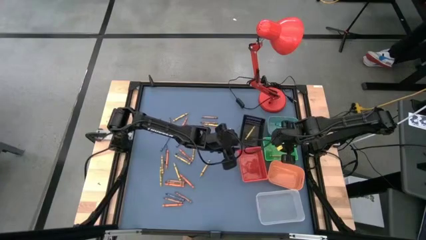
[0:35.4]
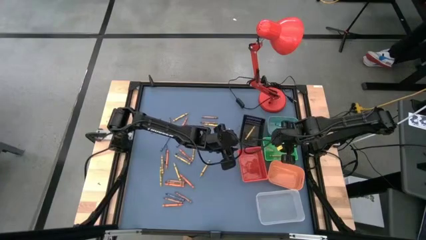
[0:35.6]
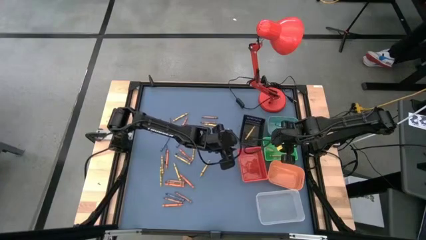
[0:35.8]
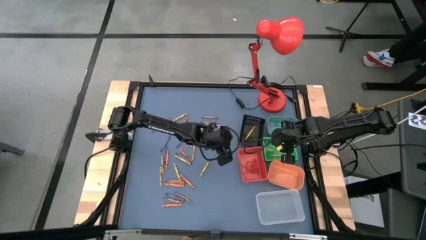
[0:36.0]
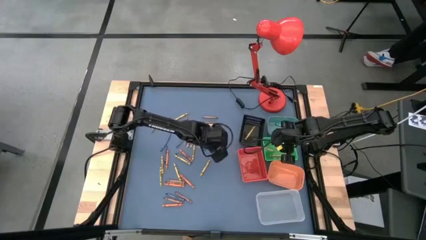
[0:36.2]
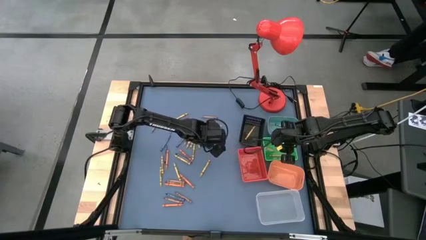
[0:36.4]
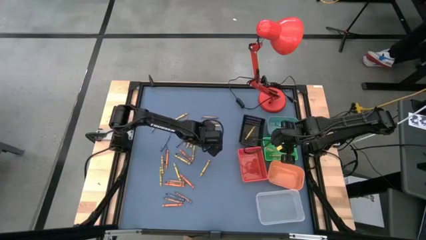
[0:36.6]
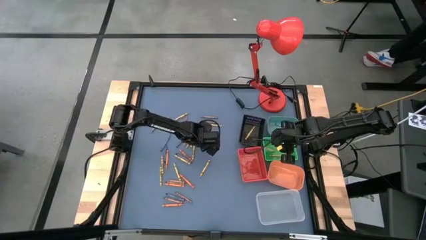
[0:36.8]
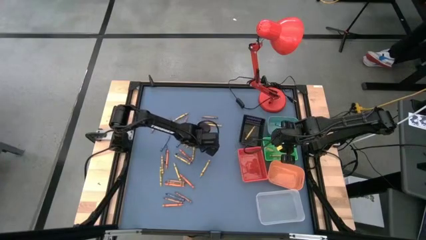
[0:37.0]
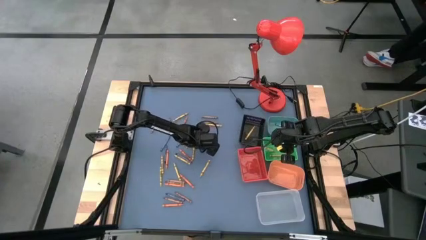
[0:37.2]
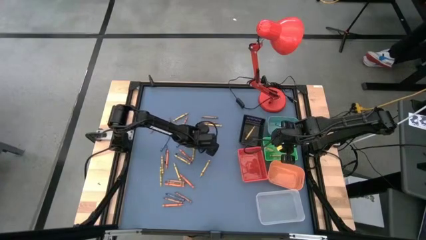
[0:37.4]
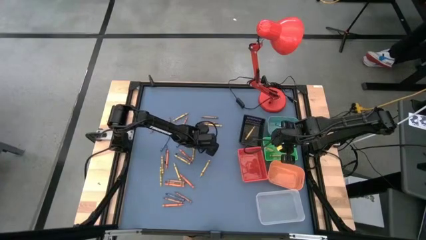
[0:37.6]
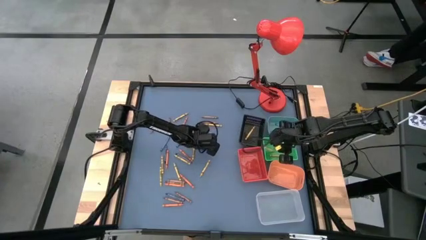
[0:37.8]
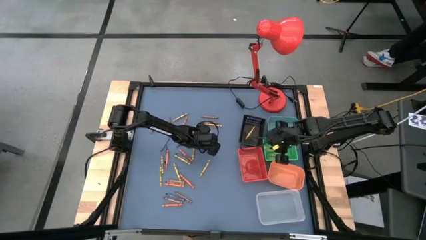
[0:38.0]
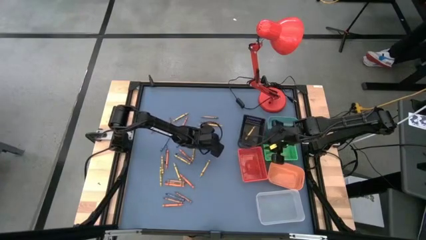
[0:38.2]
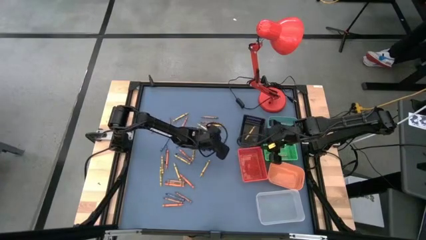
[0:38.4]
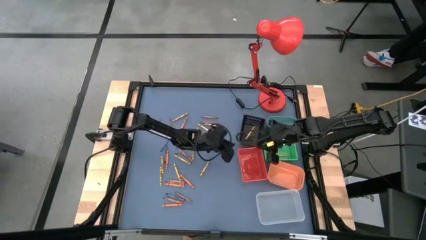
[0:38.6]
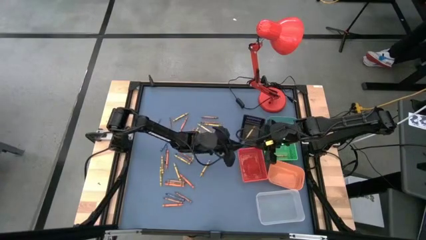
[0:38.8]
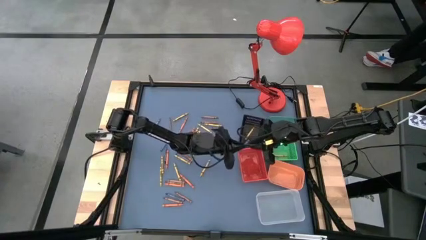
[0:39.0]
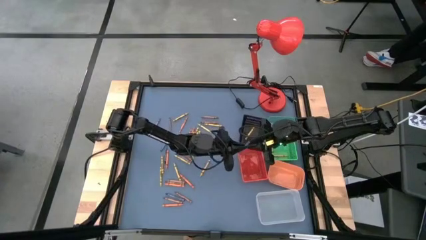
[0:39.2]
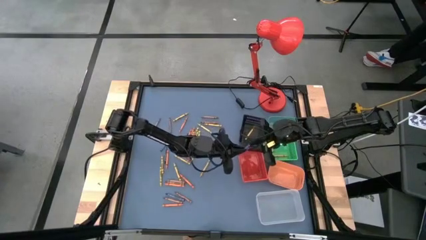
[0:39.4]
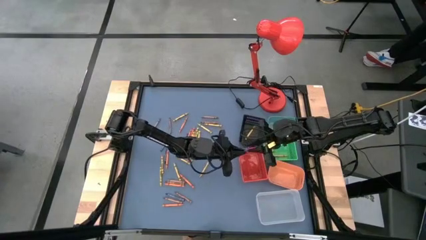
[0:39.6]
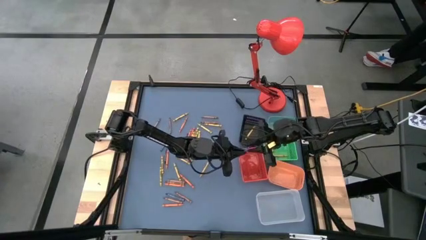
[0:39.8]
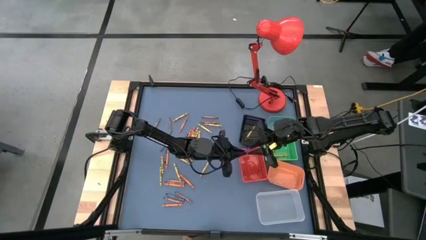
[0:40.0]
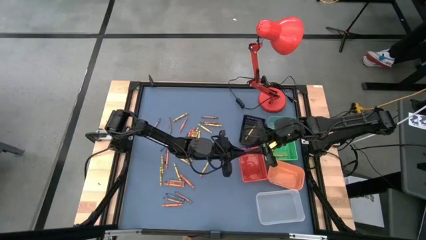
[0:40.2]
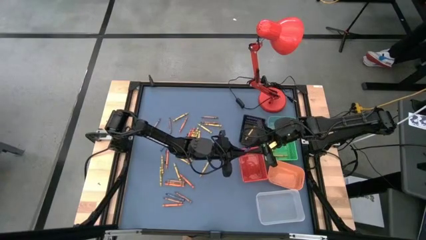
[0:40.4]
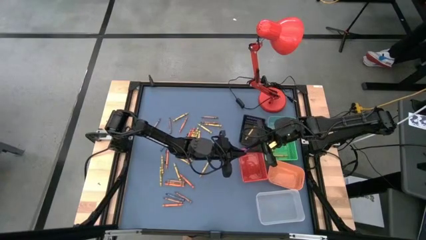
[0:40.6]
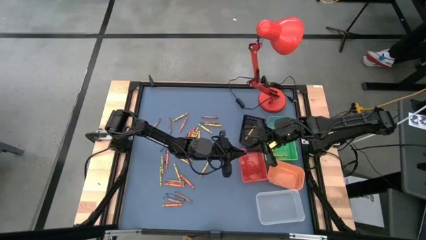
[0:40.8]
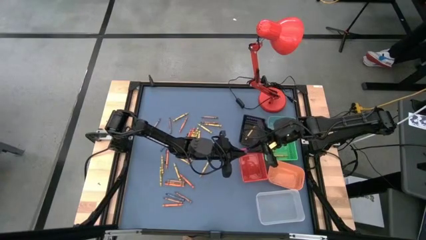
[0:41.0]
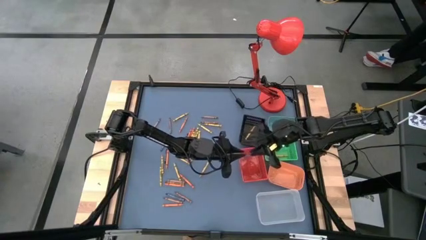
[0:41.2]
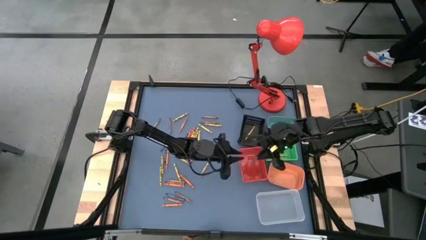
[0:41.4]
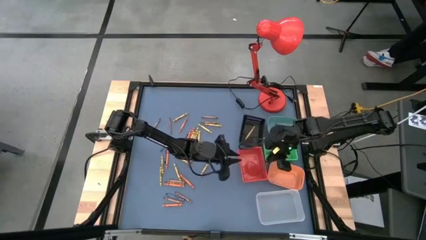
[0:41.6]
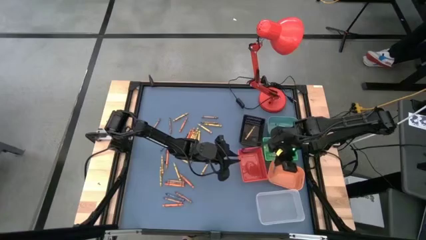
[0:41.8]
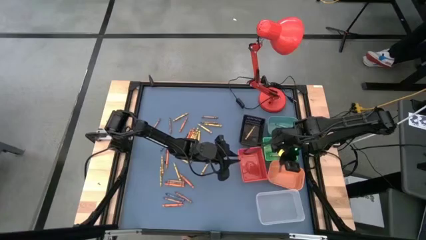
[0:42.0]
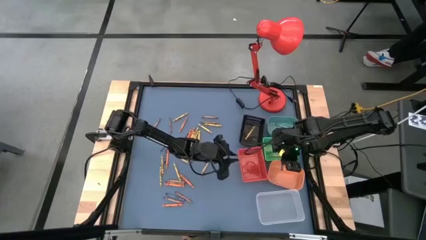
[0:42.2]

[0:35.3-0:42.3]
Task: Sort crayons
Put the blue crayon into the orange bin

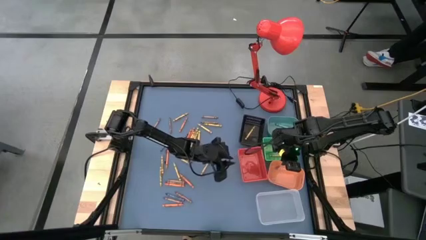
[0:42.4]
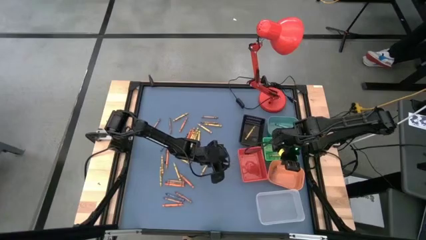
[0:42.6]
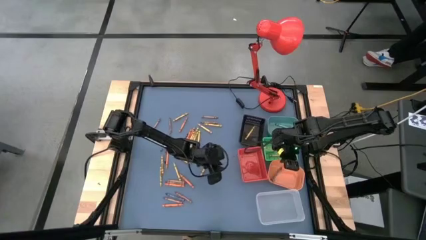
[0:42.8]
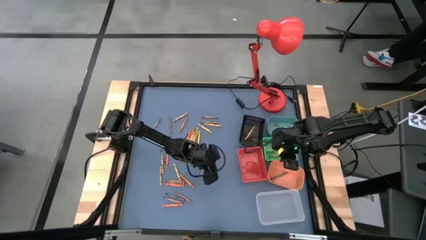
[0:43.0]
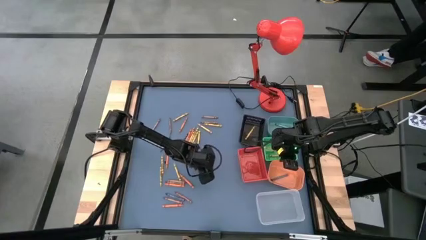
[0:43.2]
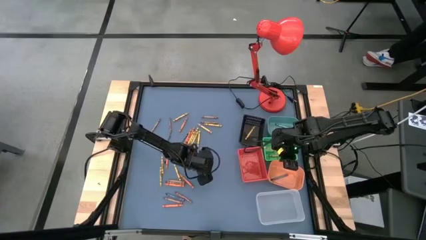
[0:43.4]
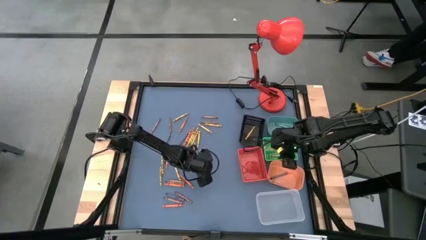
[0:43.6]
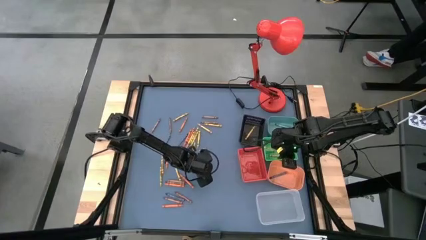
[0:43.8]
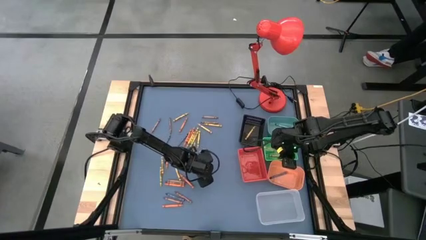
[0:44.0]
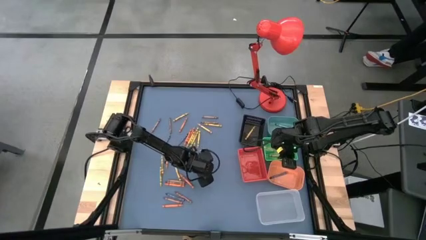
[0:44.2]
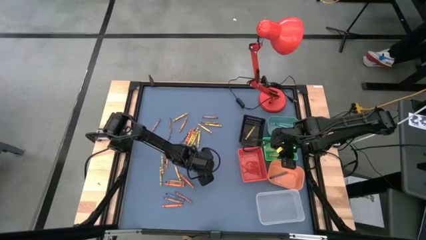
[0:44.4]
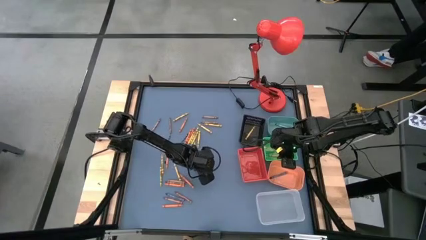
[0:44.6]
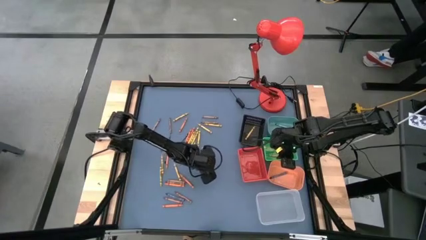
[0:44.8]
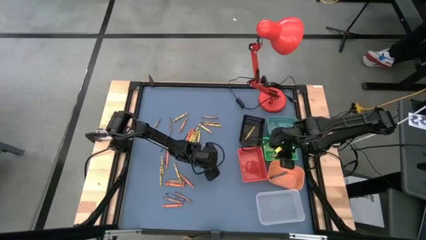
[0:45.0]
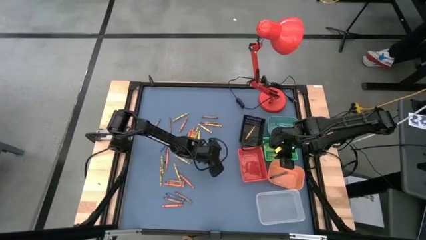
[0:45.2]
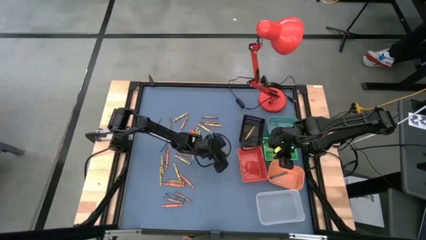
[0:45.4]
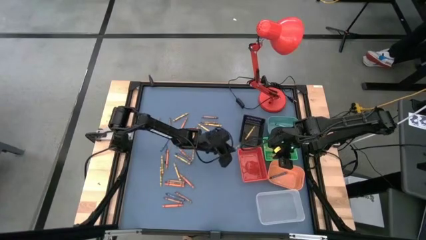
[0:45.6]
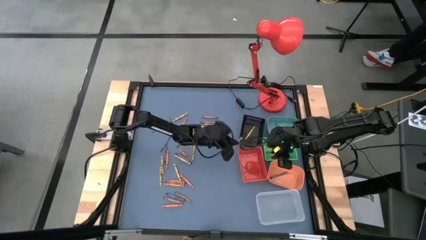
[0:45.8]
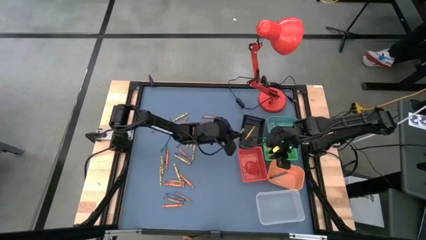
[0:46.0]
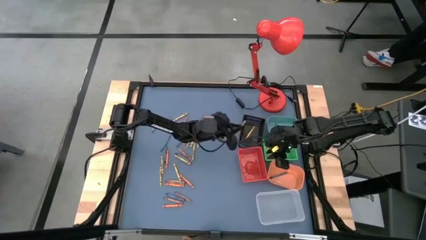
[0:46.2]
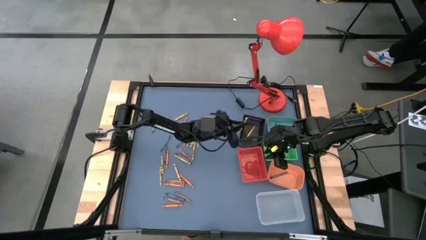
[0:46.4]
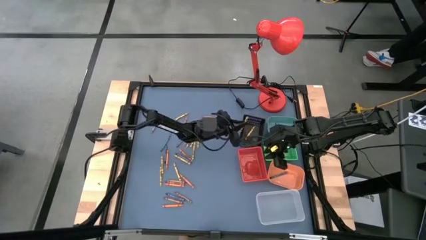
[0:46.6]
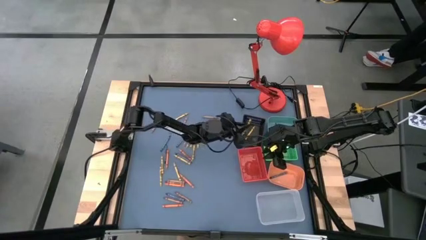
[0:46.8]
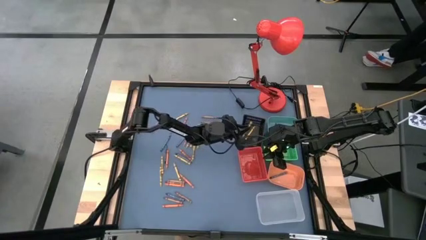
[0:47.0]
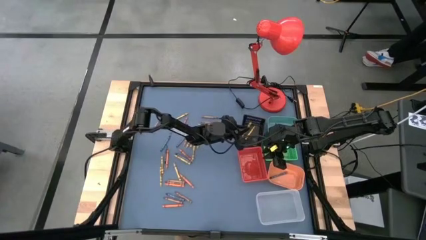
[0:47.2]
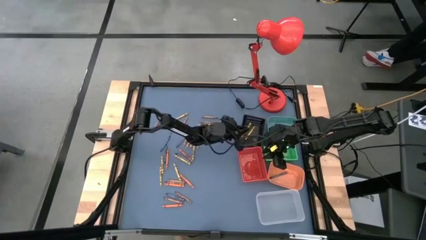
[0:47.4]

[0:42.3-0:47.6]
Put the yellow crayon into the black basket

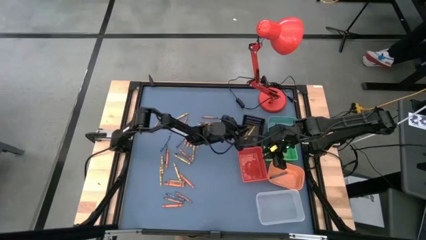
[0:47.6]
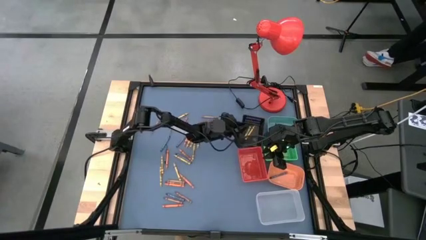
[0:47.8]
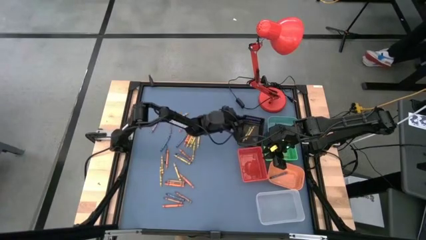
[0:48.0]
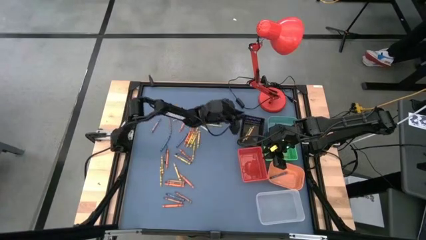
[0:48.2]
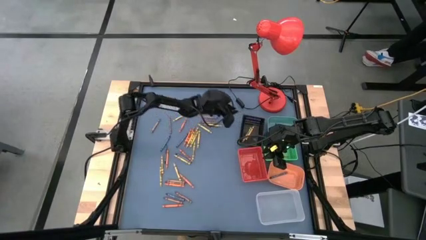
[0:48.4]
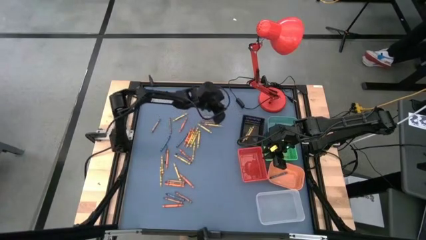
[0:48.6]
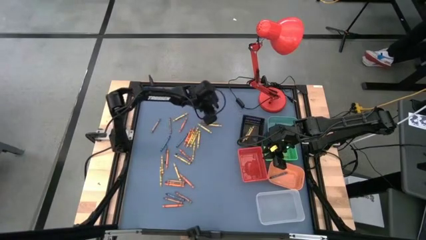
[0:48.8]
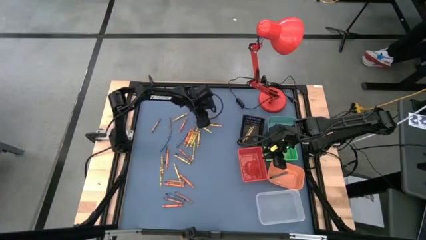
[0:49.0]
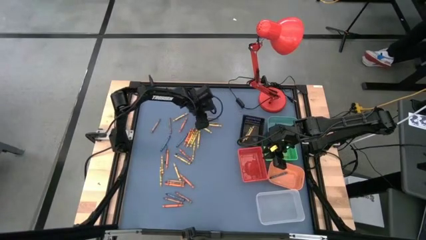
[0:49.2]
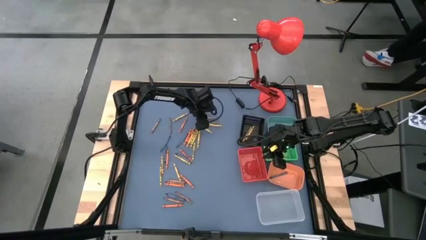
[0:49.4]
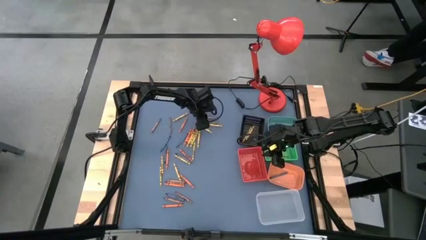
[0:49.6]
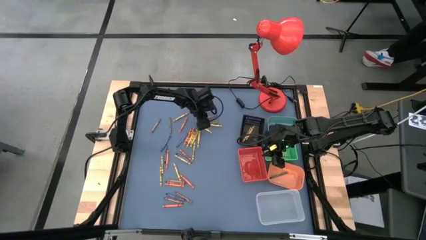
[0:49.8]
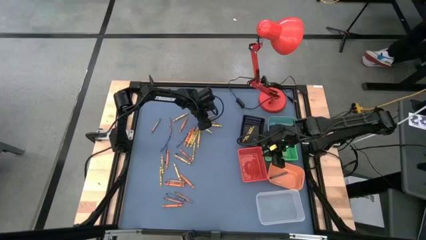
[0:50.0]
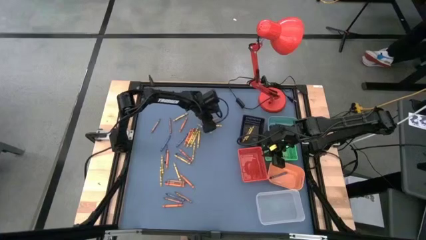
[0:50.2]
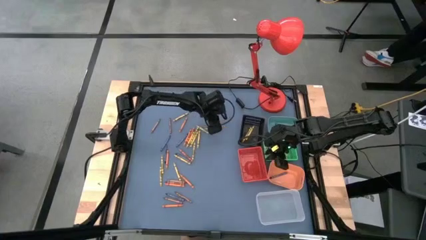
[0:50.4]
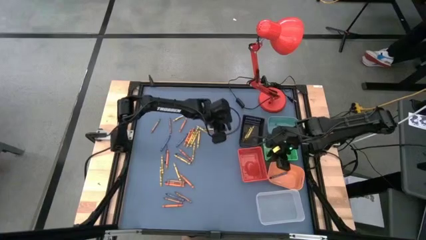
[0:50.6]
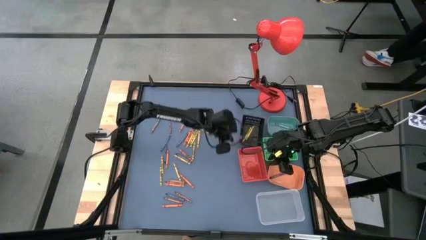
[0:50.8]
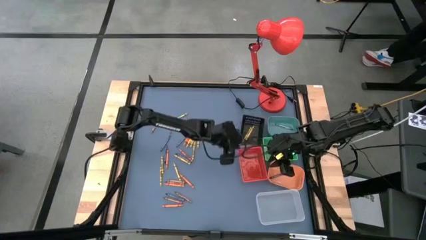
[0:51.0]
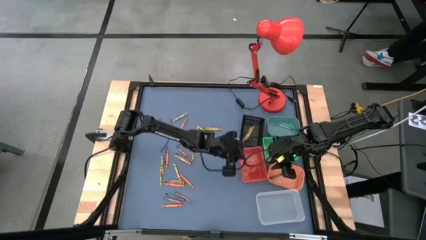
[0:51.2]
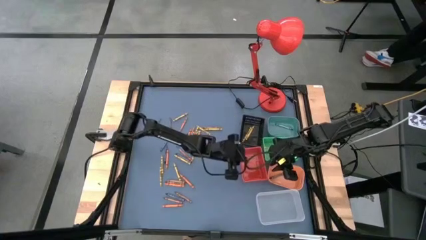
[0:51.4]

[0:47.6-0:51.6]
Put the brown crayon into the red basket

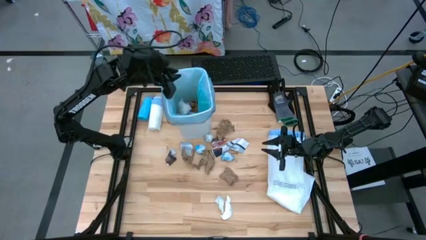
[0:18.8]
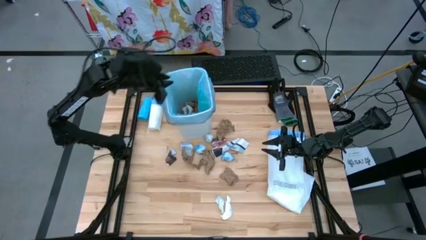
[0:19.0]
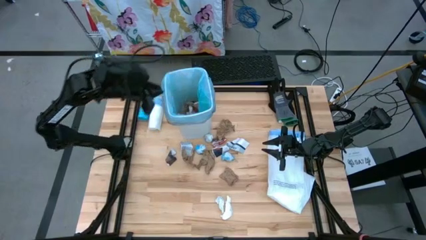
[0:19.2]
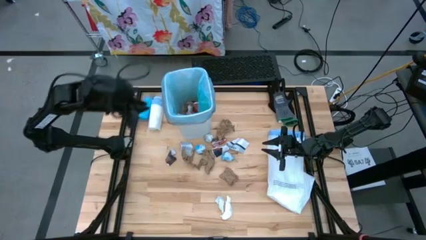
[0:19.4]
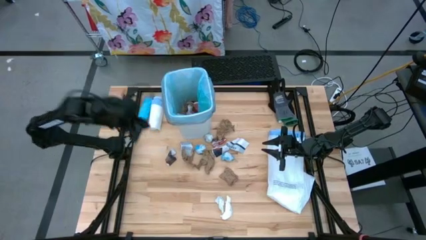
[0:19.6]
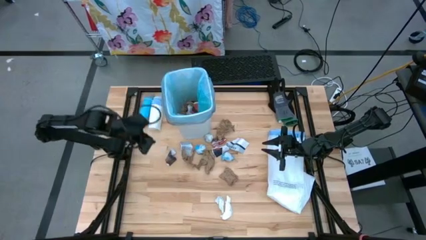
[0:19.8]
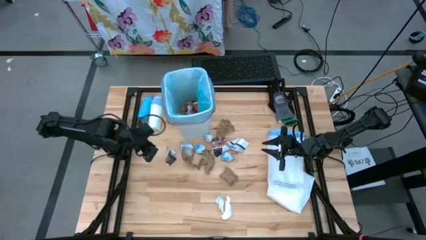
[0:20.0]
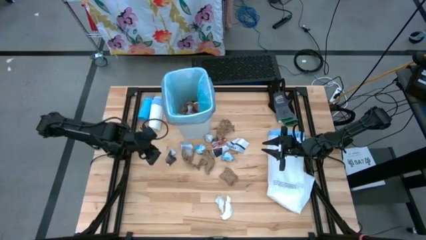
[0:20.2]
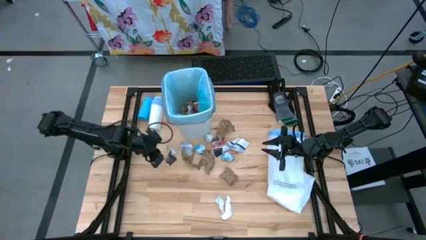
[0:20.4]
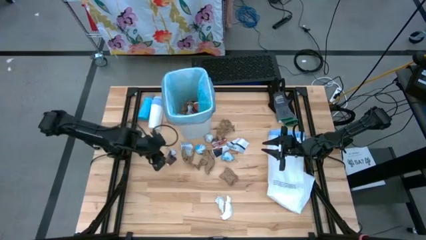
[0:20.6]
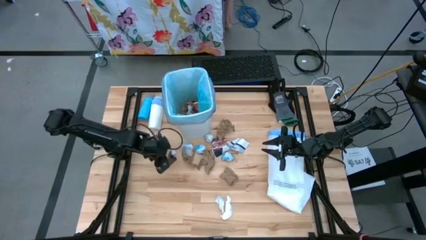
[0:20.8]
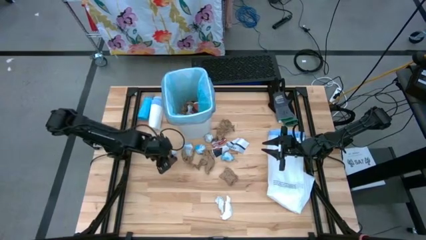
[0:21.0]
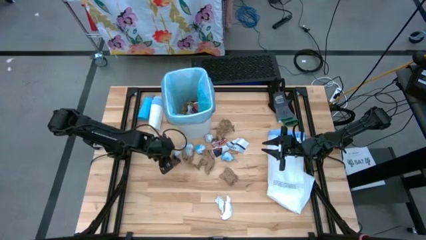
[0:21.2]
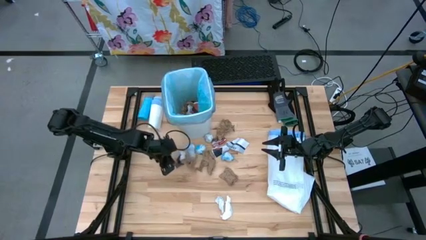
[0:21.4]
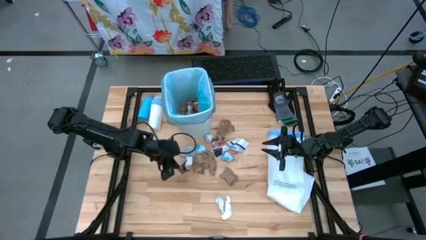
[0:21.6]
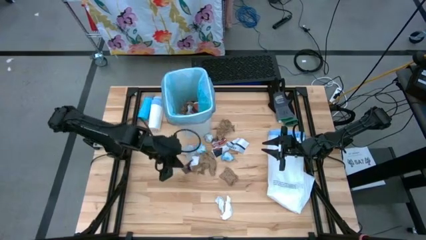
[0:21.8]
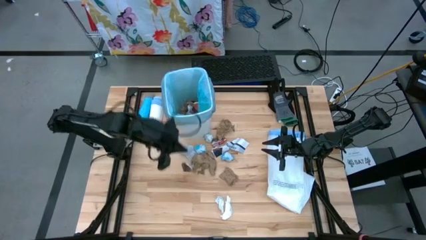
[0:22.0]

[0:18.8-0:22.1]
Task: place trash/remove bag and relplace
Put the black paper into the white trash bin
